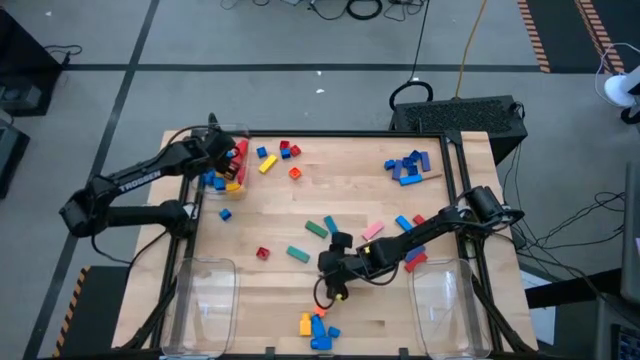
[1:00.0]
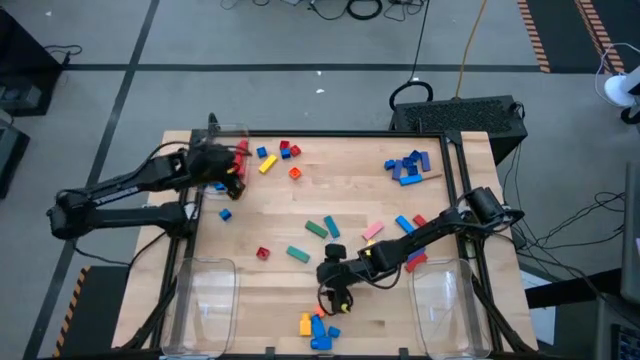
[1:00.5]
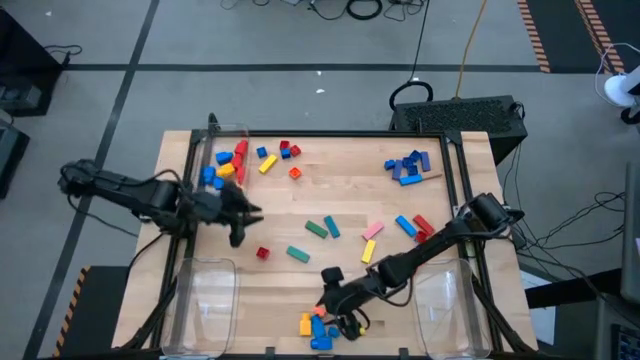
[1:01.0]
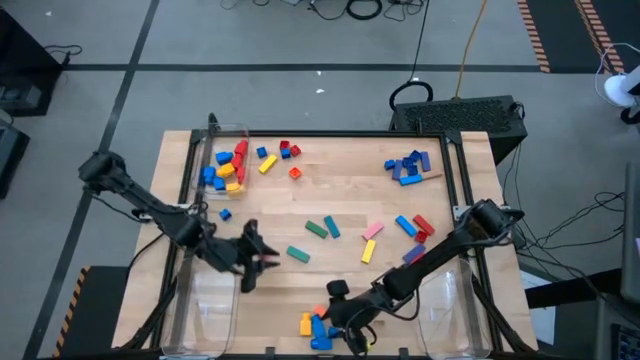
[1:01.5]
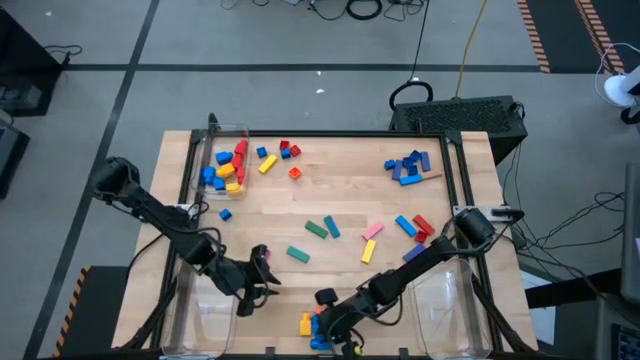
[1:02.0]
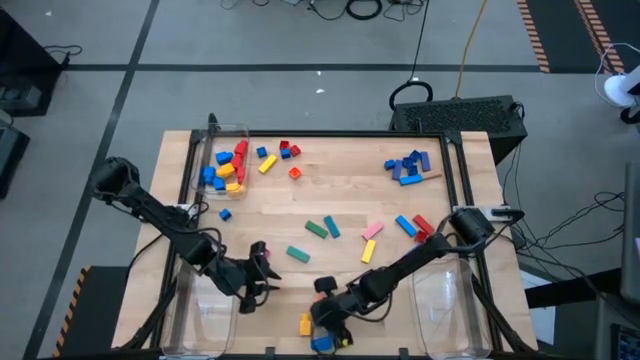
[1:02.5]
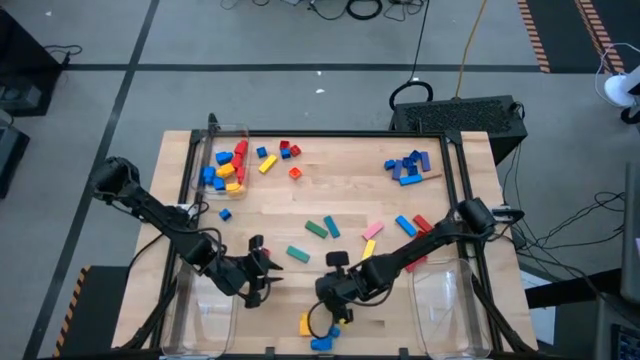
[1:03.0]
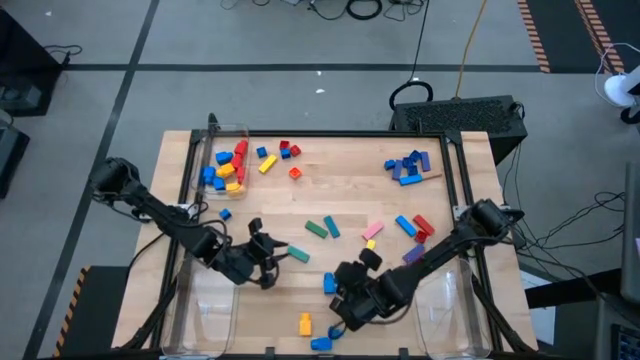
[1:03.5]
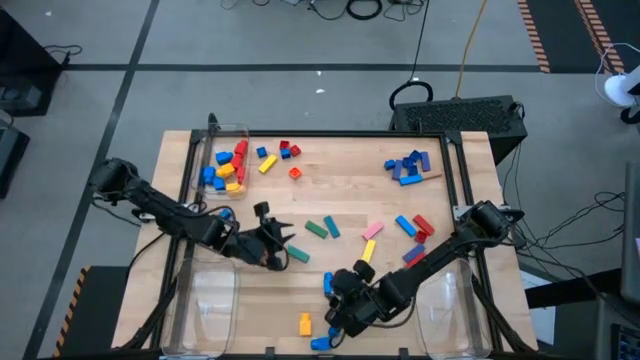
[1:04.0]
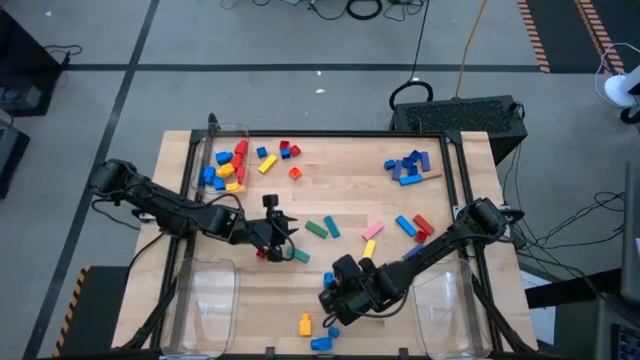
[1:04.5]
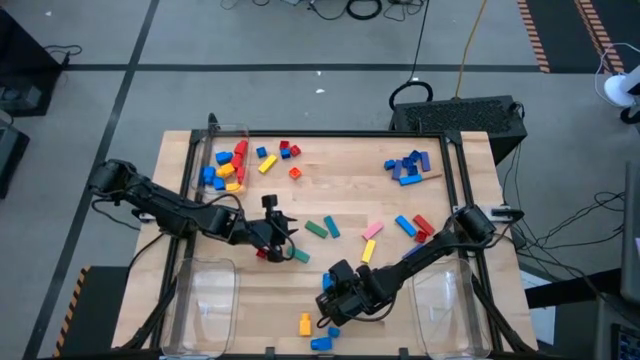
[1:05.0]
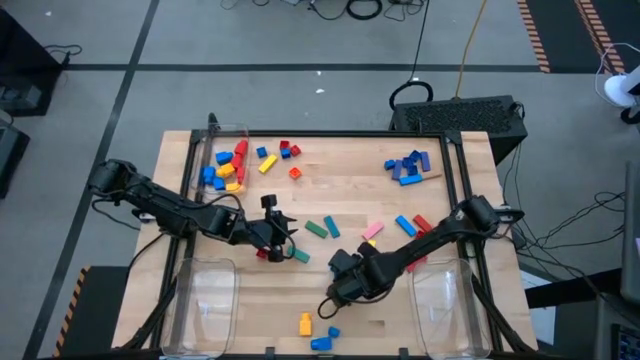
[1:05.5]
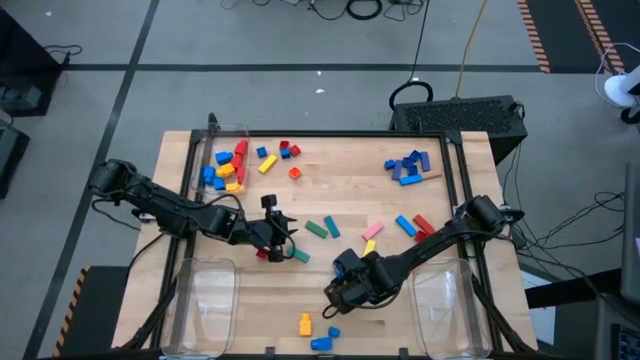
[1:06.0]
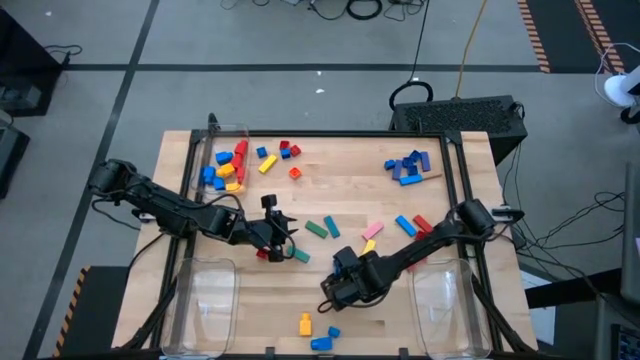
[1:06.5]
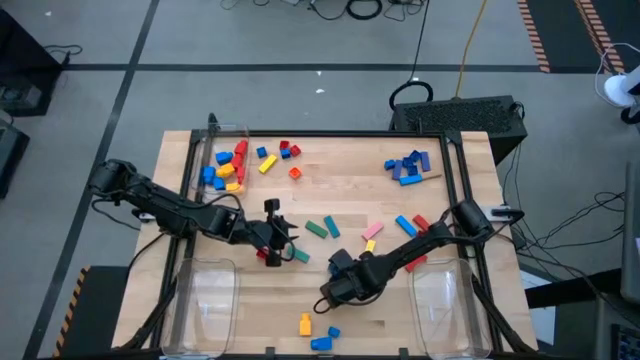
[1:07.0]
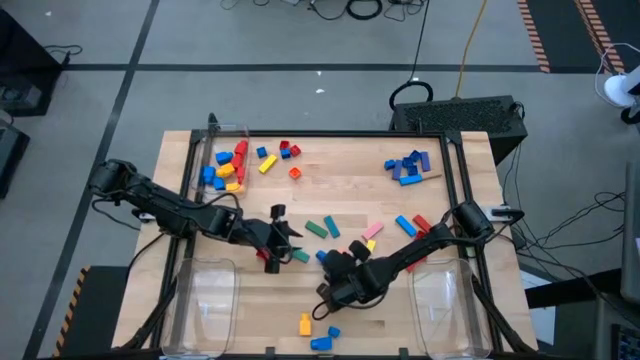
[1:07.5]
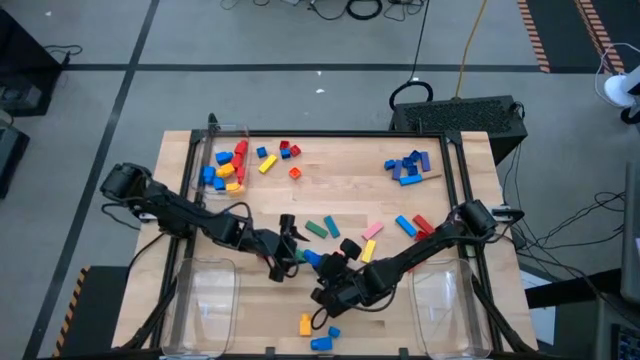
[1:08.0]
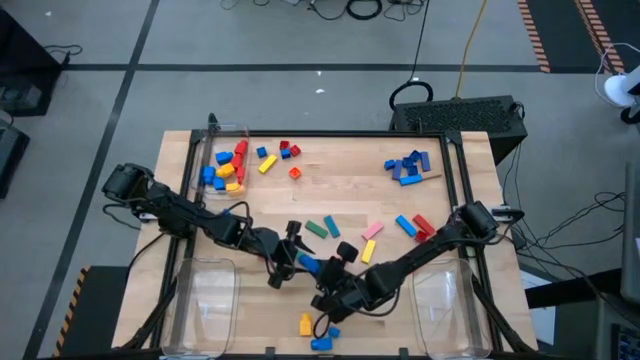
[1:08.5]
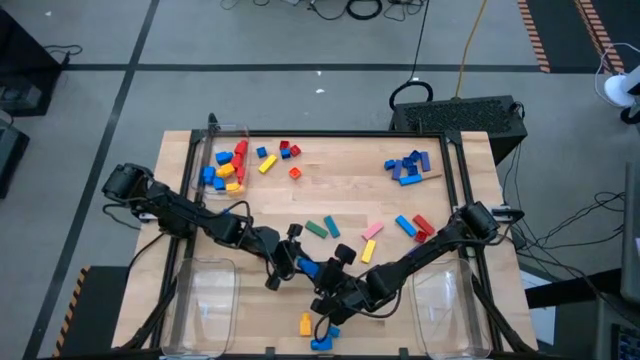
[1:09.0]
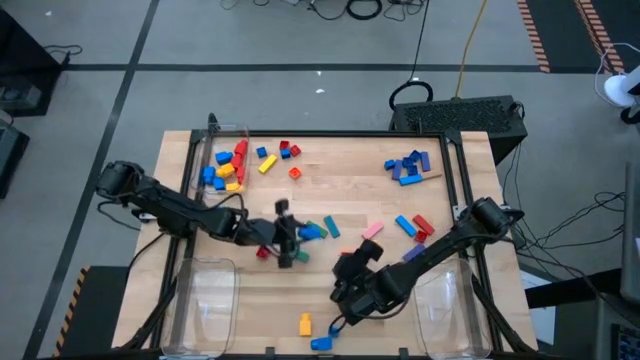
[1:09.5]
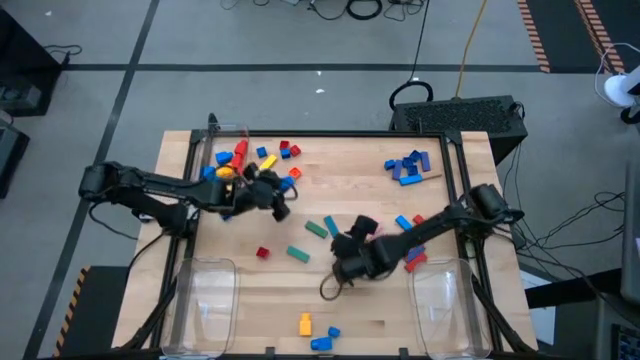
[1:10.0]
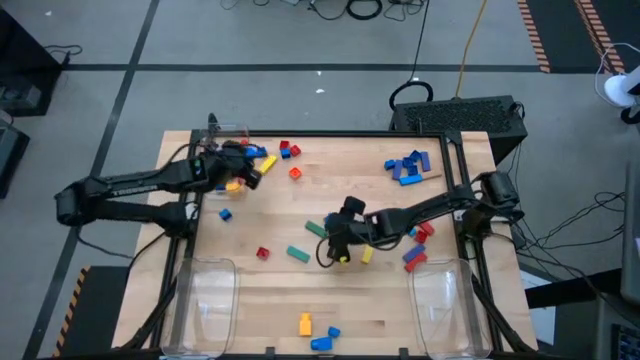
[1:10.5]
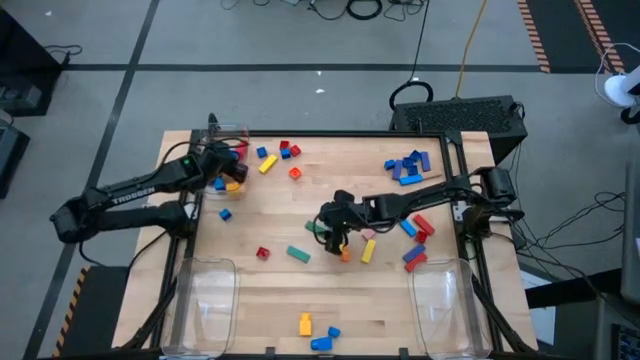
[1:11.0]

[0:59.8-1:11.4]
Task: Sort blocks by size
Put the blue one stud game piece into the top left transparent bin

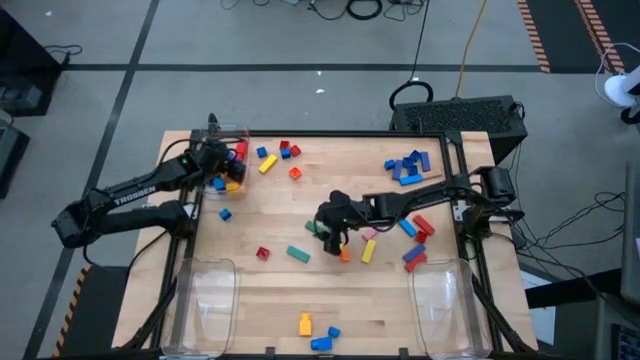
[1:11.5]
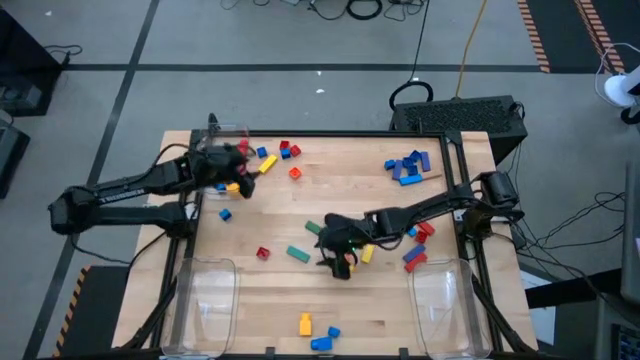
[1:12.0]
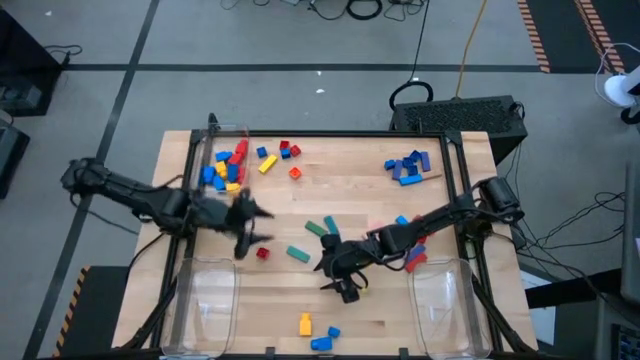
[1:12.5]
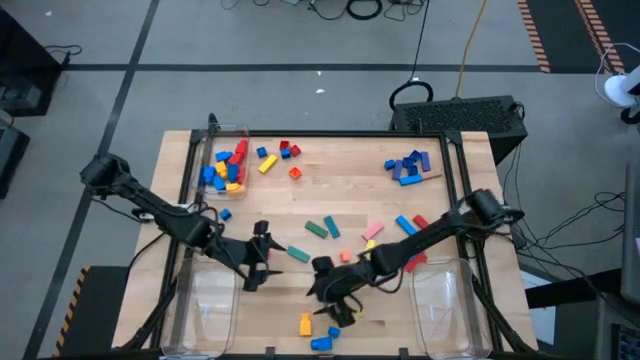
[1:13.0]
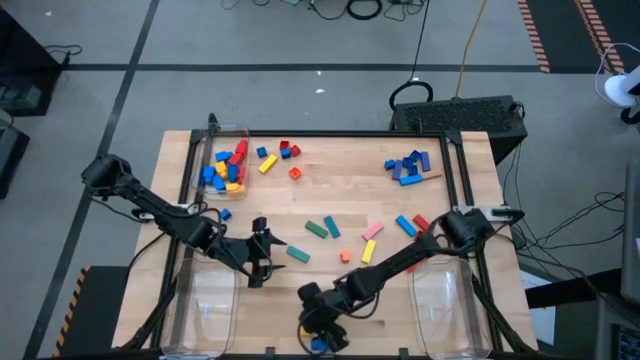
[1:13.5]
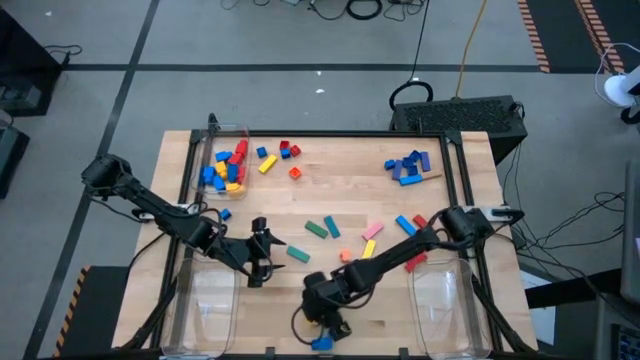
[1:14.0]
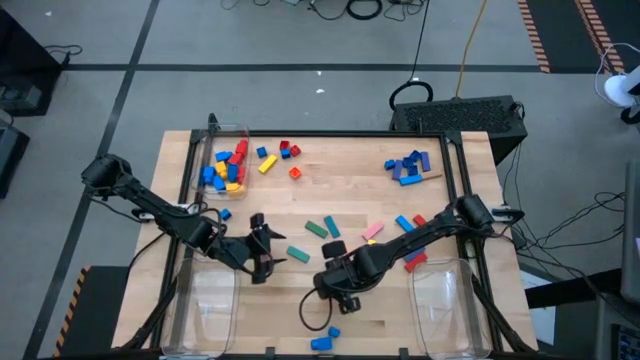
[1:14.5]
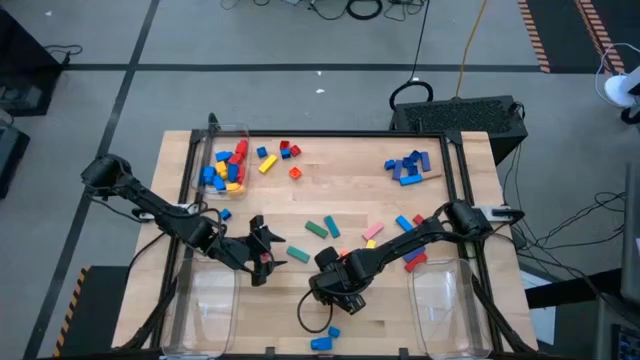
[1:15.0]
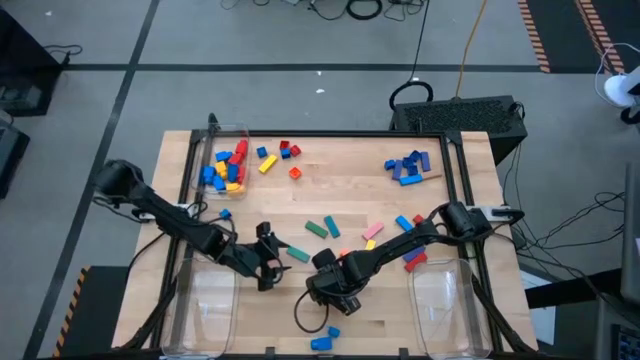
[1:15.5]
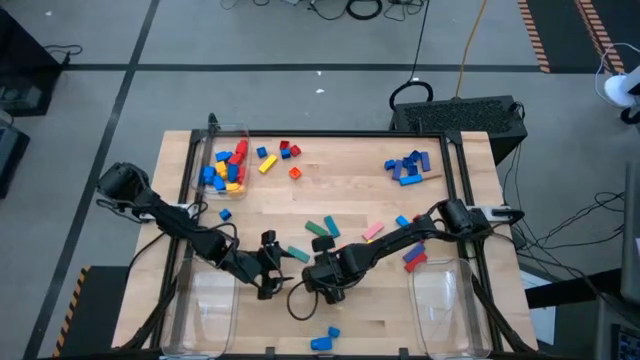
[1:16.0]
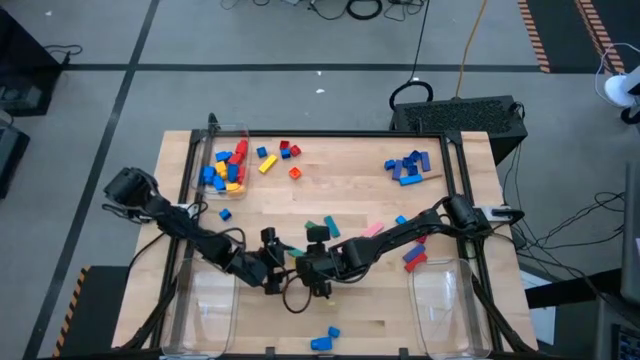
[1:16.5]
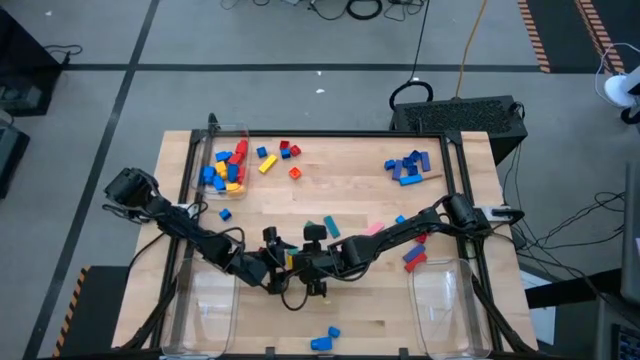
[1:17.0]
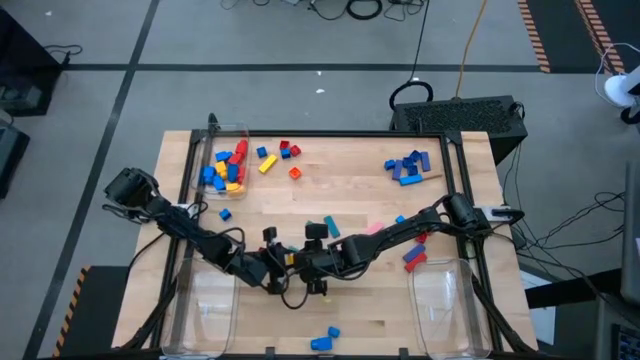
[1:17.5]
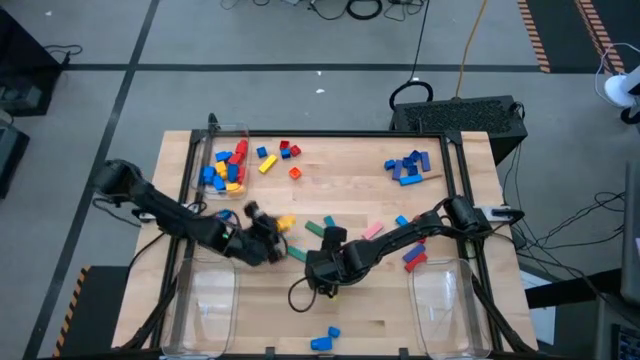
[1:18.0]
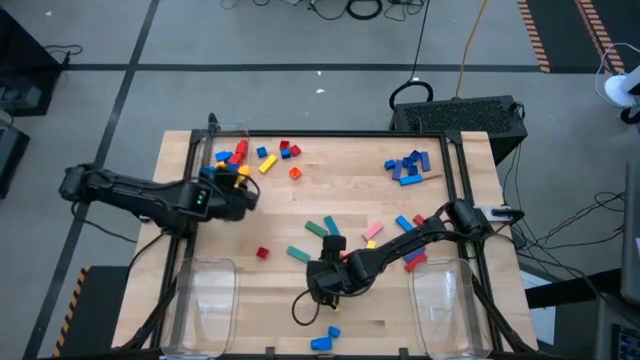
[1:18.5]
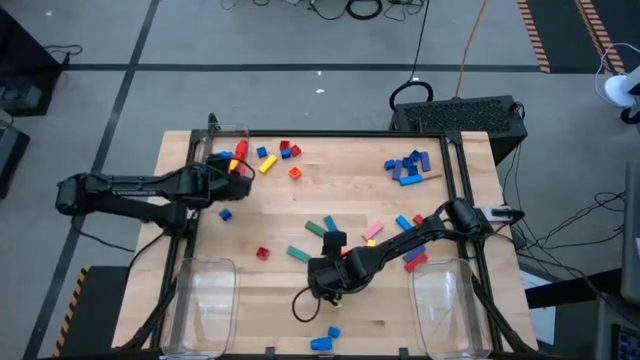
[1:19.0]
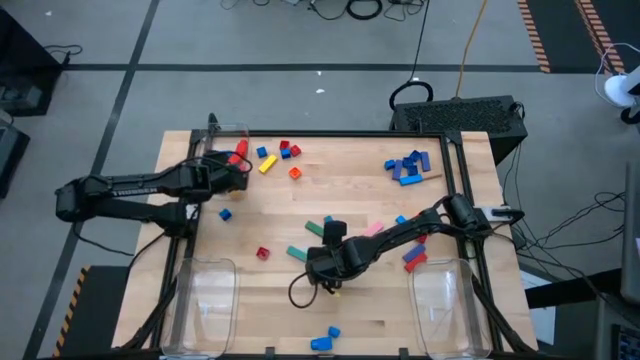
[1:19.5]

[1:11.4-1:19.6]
Put the yellow one stud game piece into the top left transparent bin

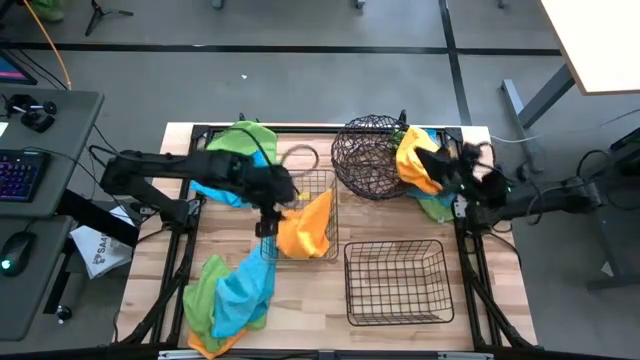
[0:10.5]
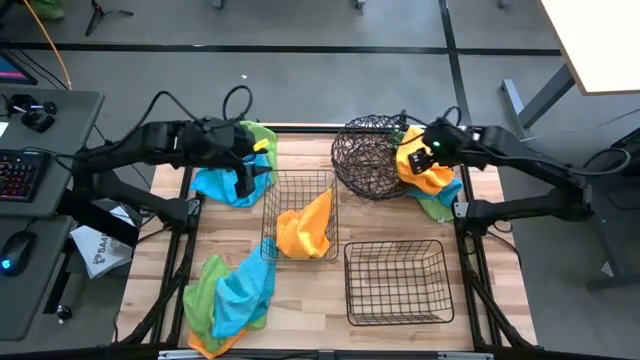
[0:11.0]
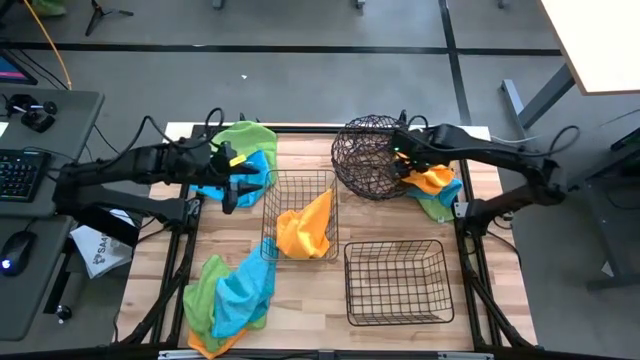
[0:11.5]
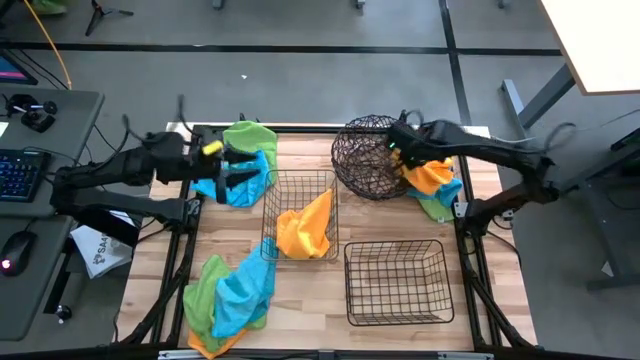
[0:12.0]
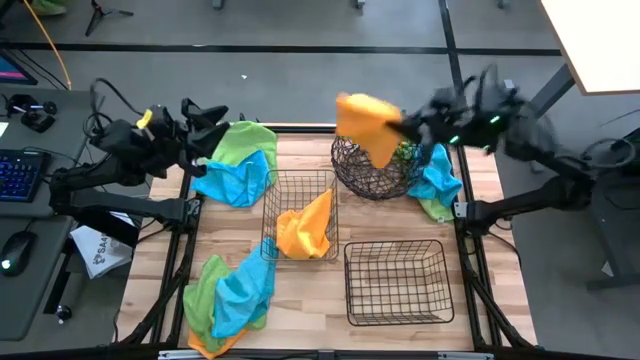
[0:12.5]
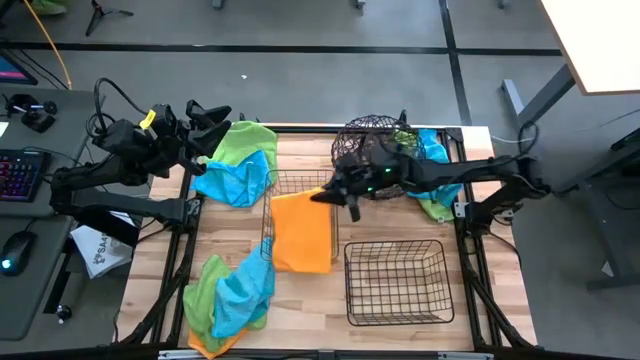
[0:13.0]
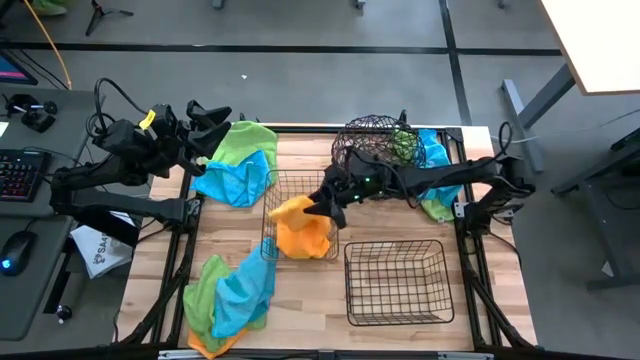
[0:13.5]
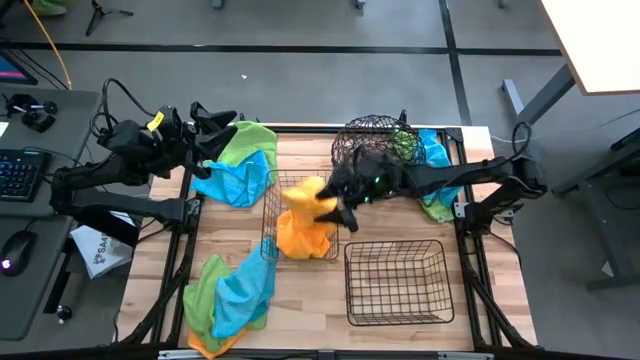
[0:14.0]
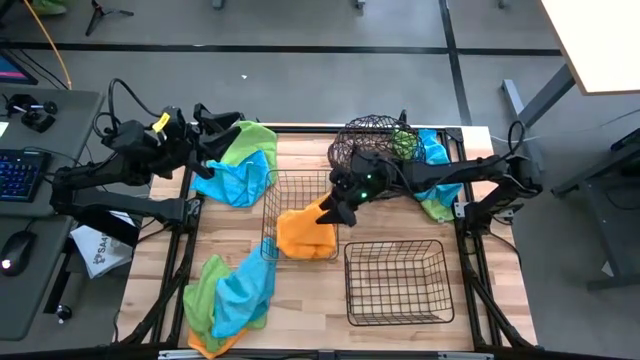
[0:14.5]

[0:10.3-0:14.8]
Task: Sort microfiber towel by color & place in baskets
Put the top orange microfiber towel into the center black metal basket
